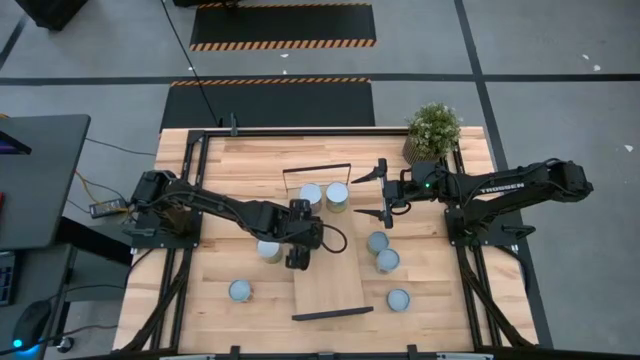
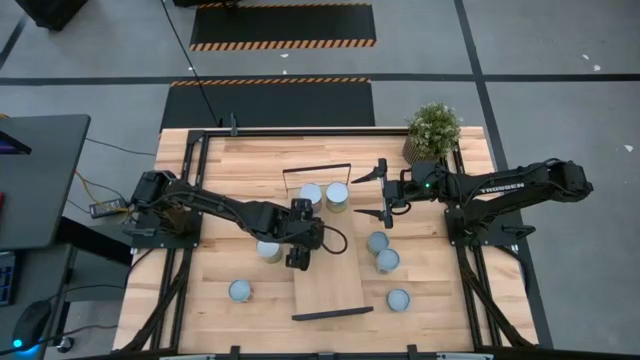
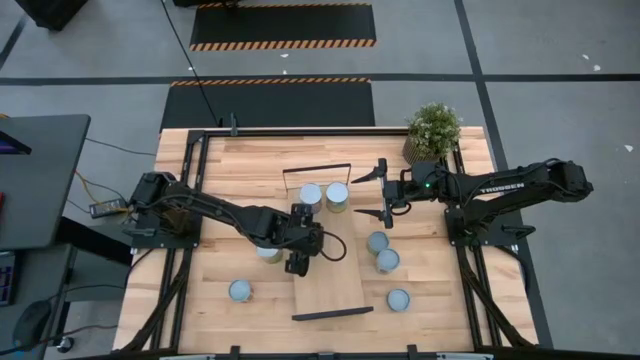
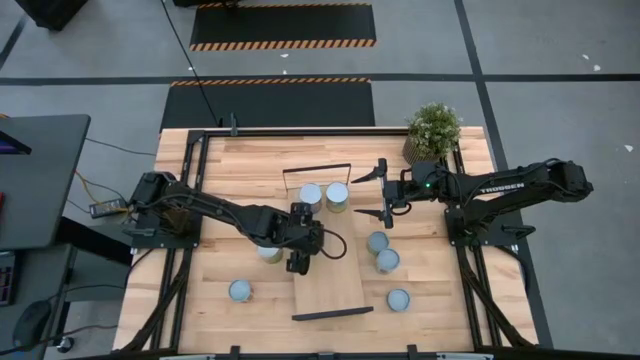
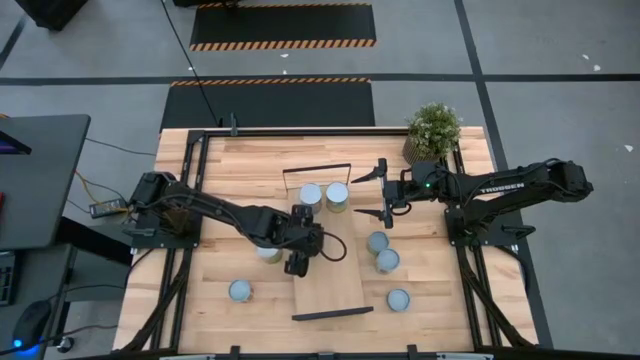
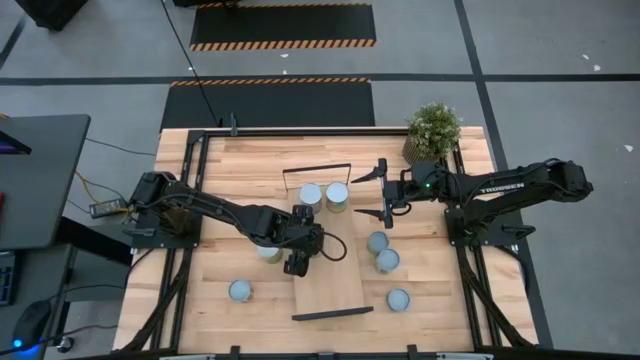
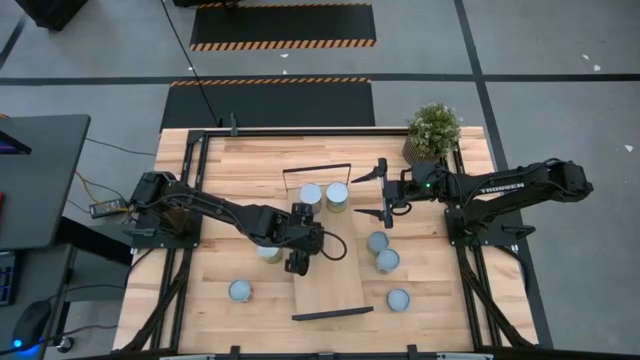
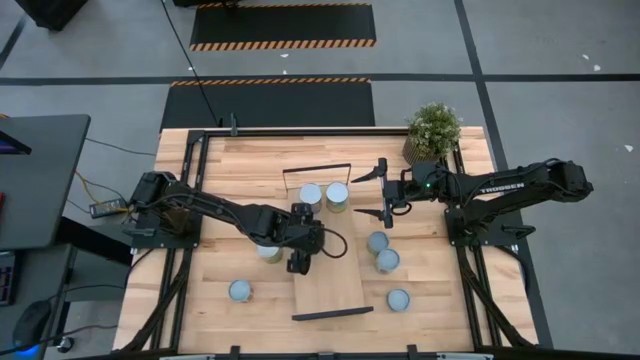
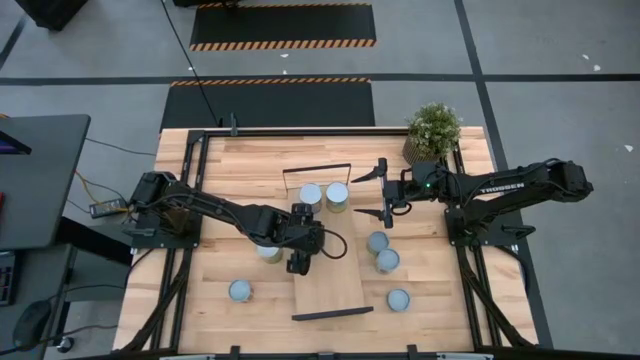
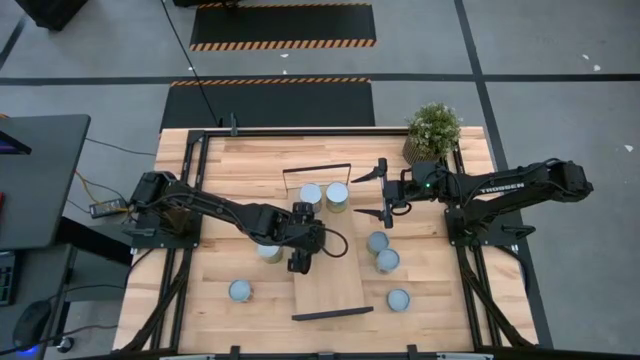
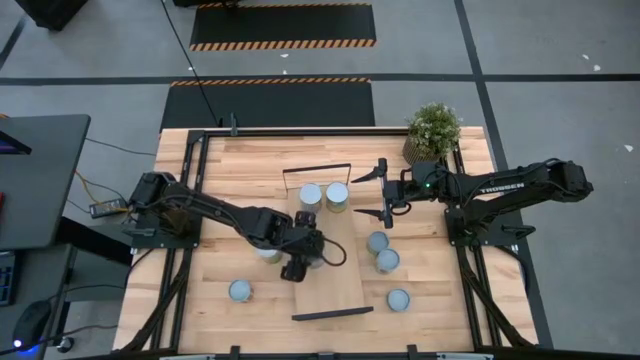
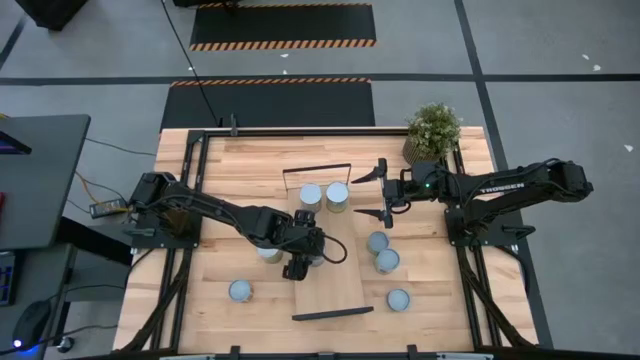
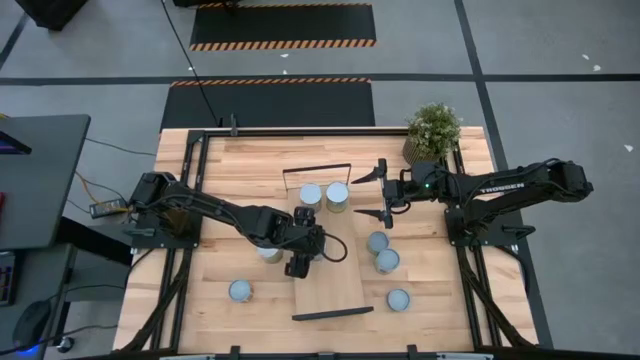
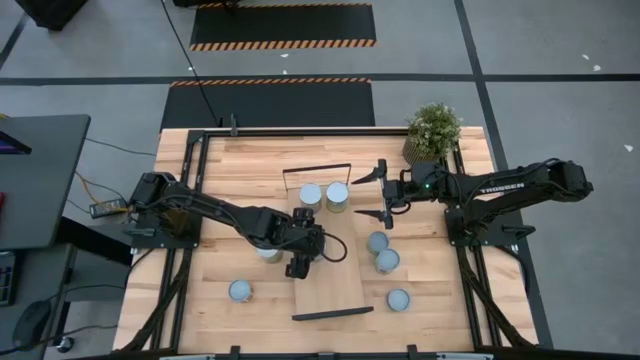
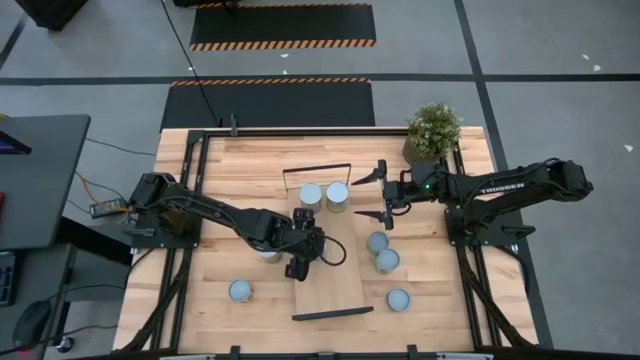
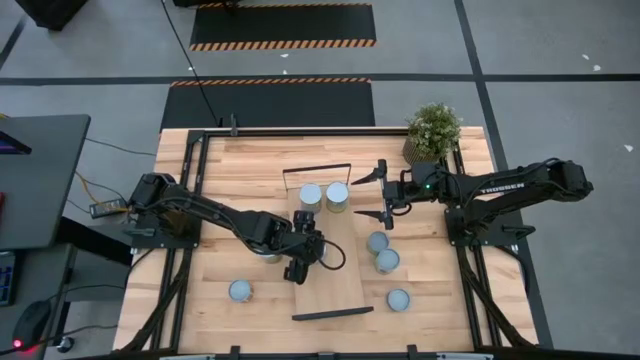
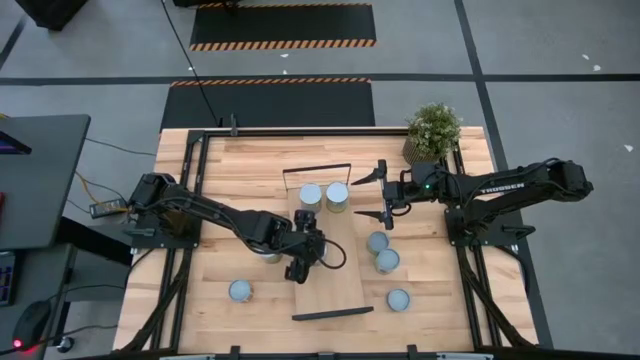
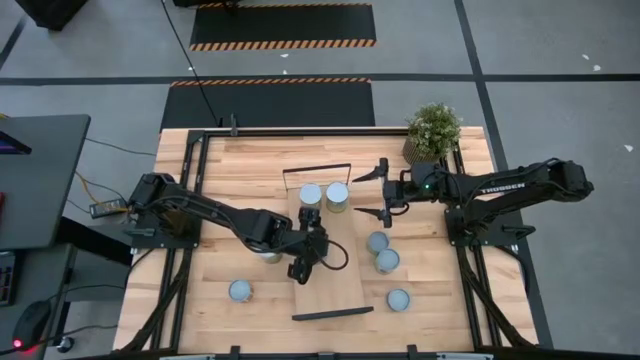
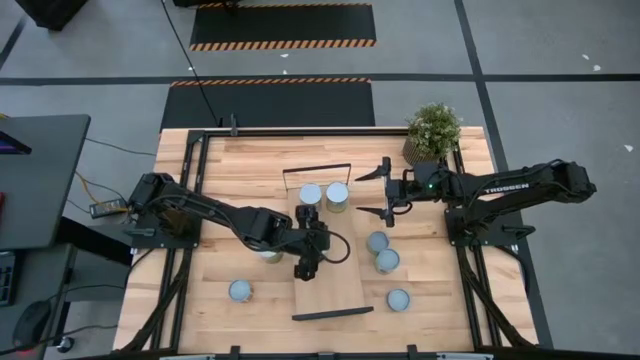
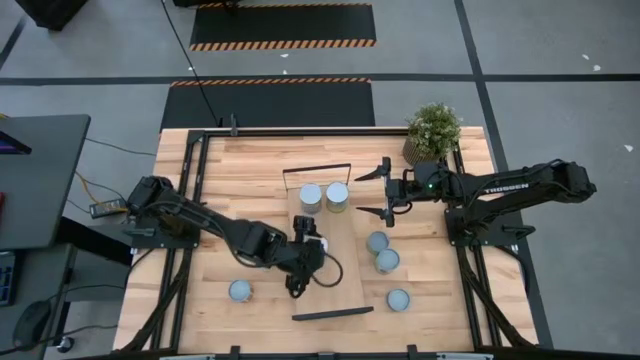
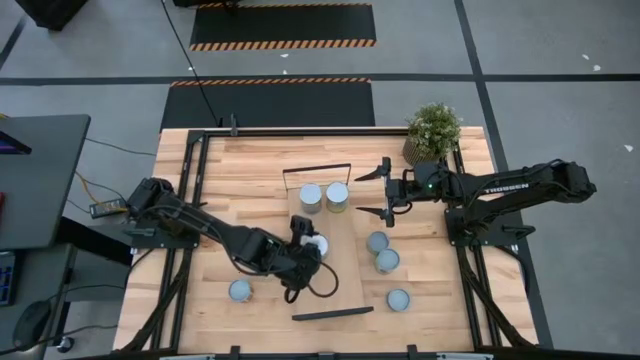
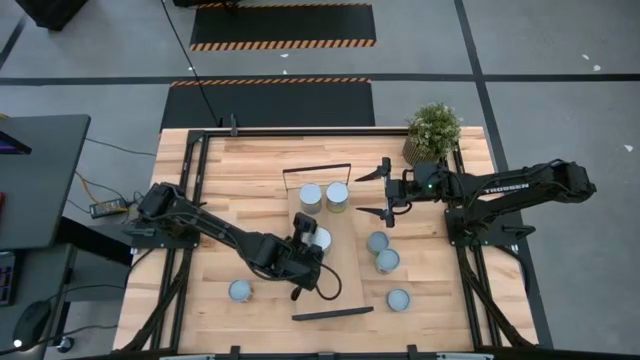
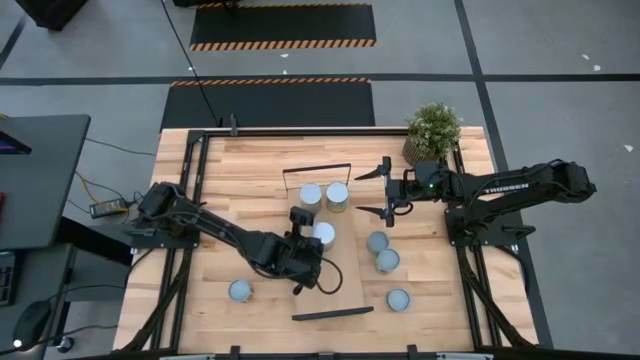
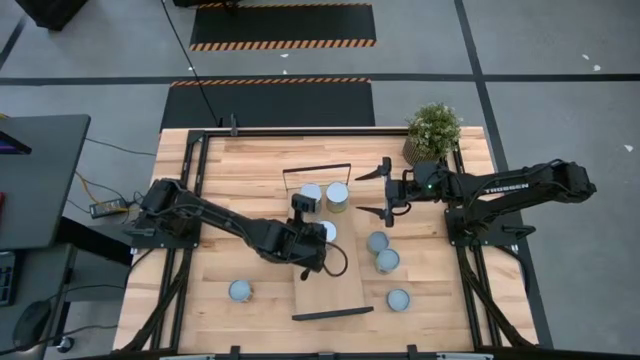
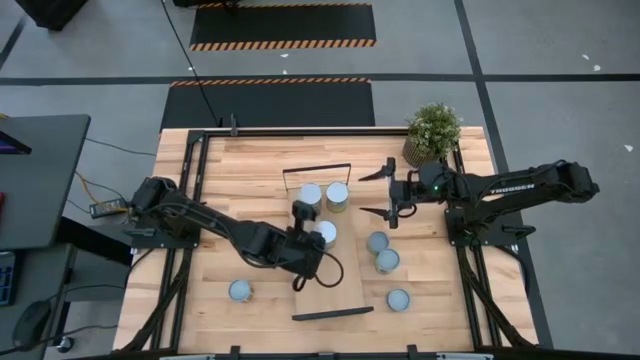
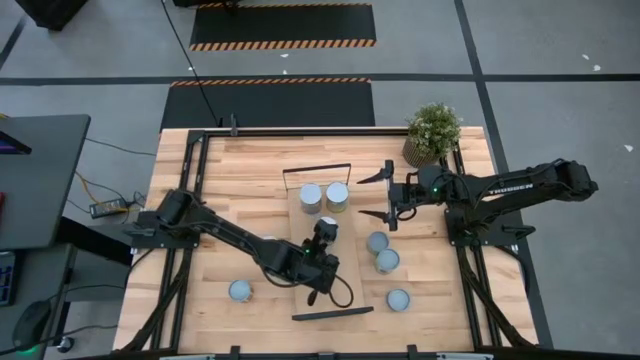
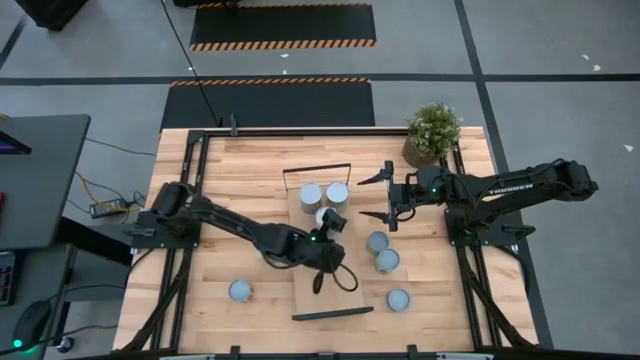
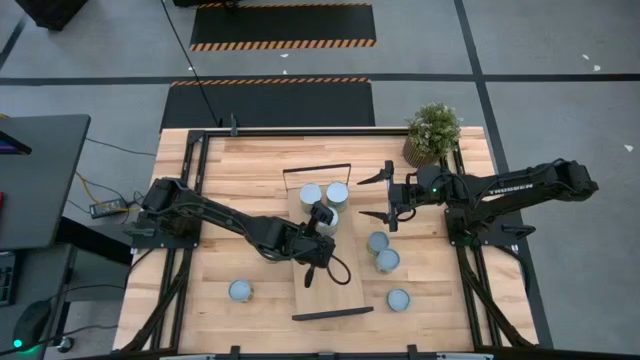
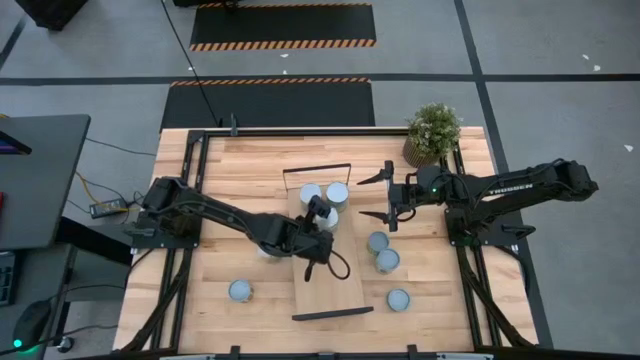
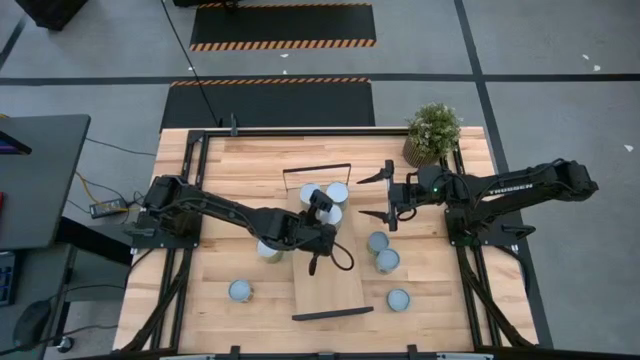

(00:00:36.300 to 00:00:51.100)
Task: Pick and place cans onto a shelf
Put the canned peas on the shelf

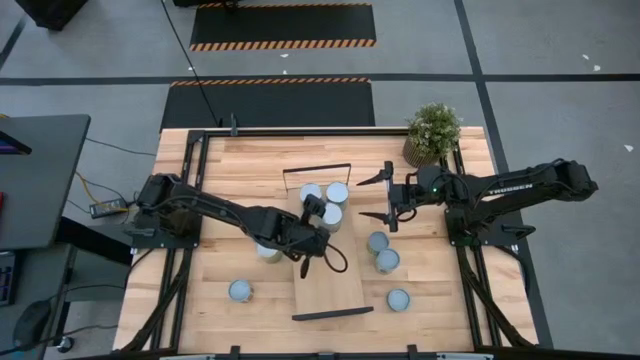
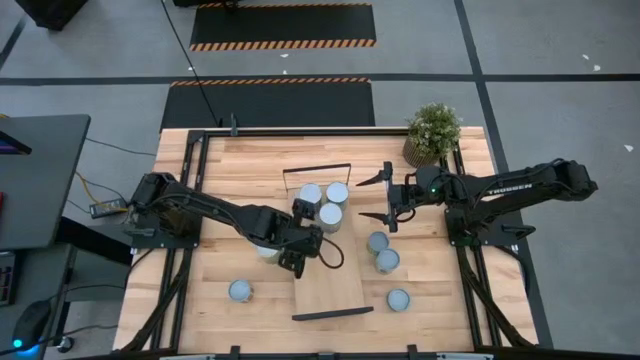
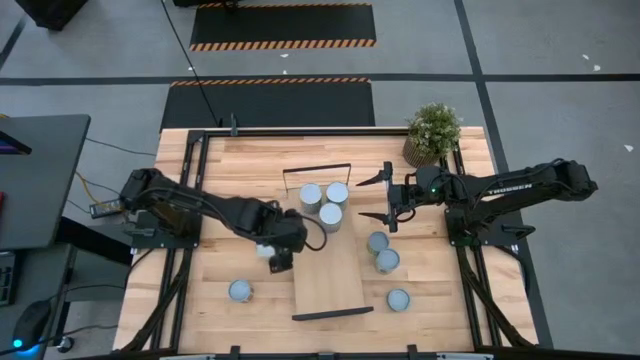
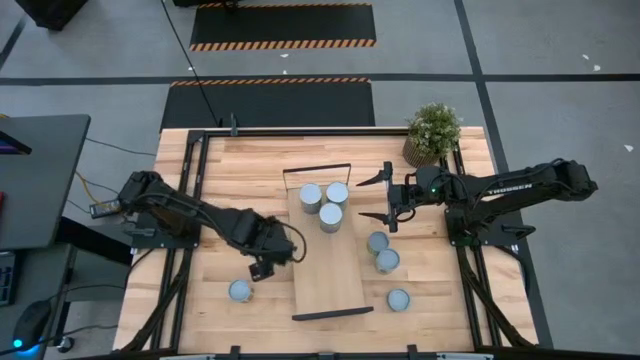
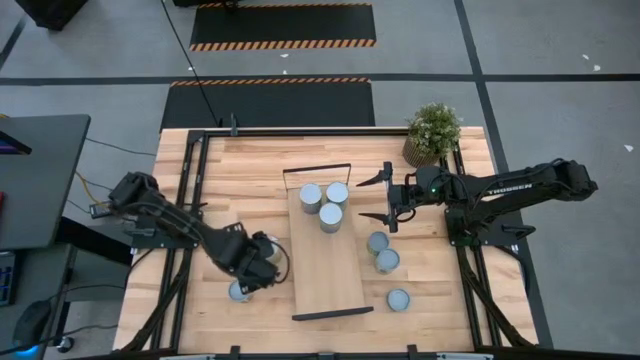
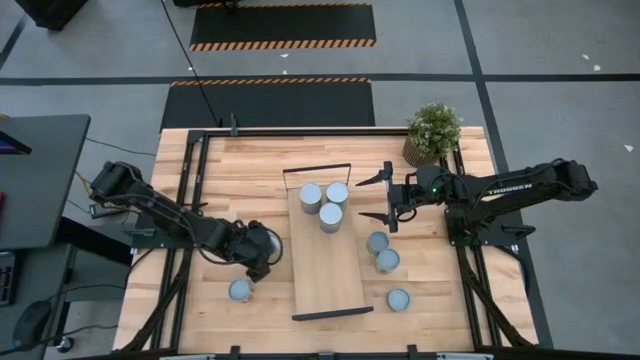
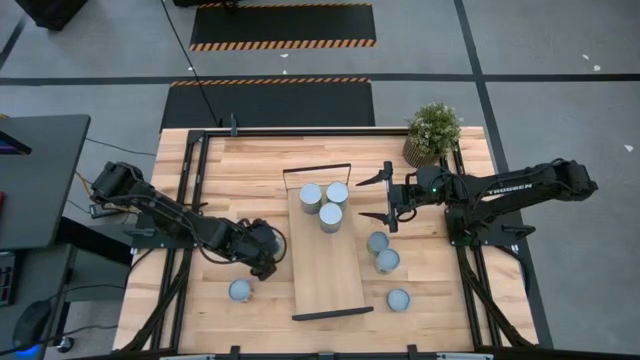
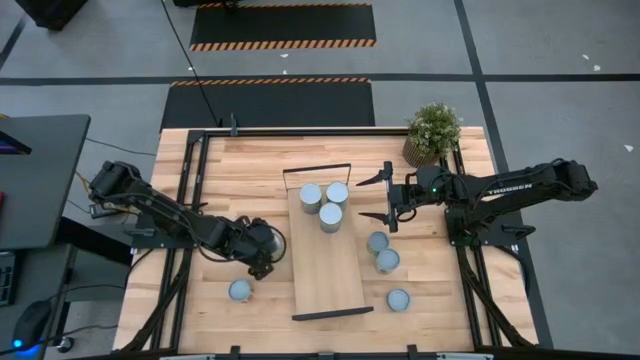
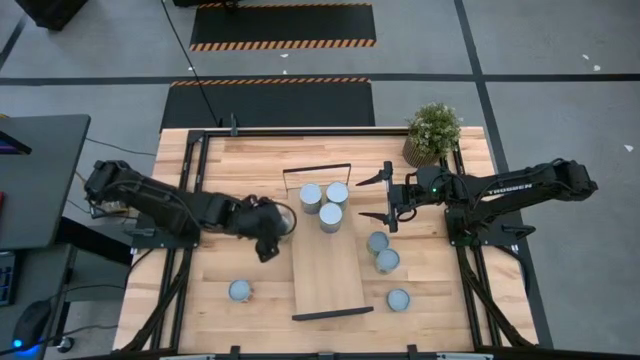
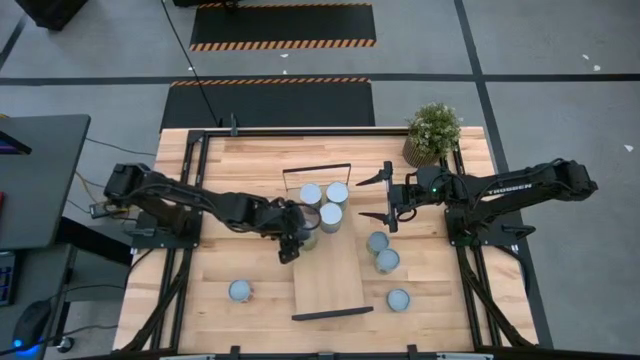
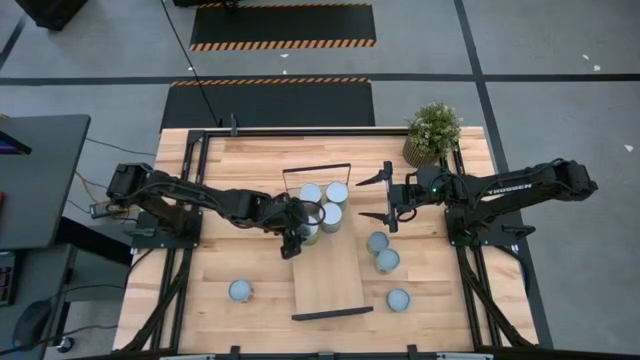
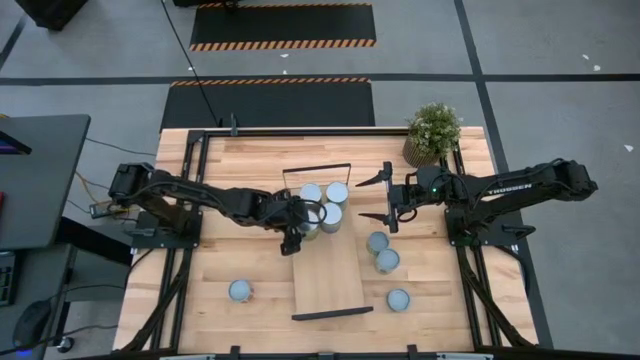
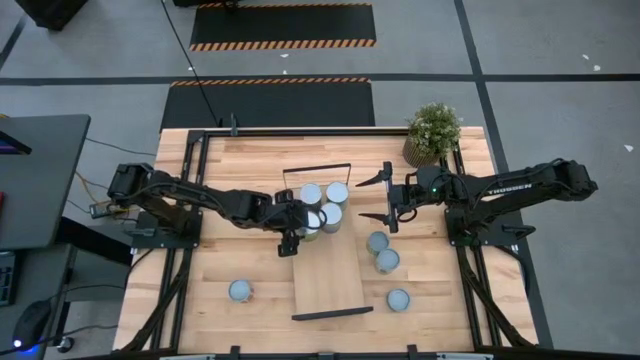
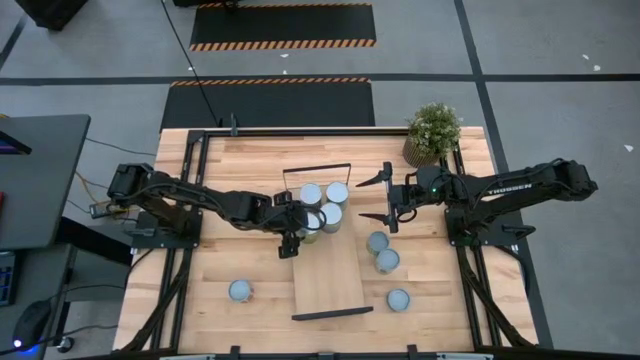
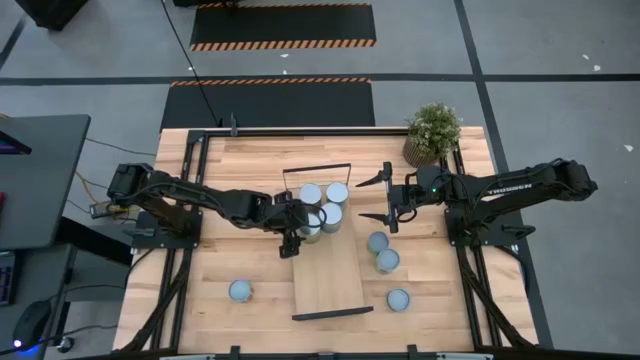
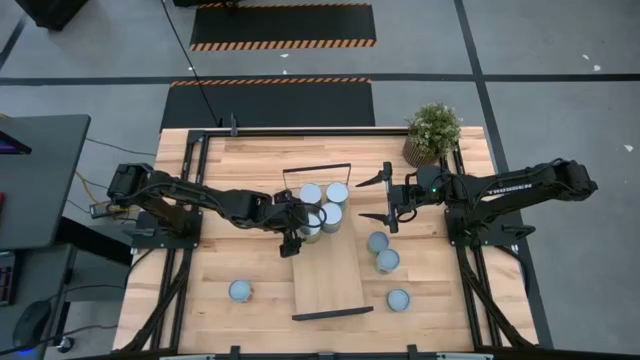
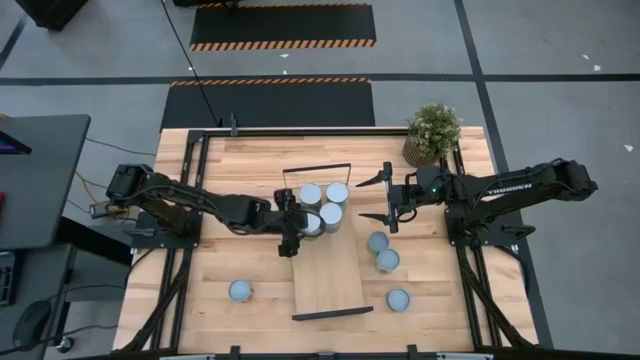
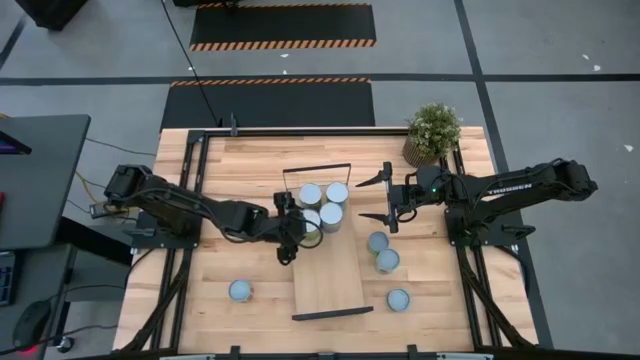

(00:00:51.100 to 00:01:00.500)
Put the canned oranges on the shelf
